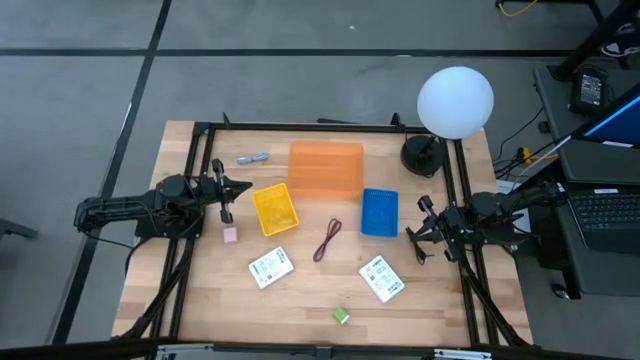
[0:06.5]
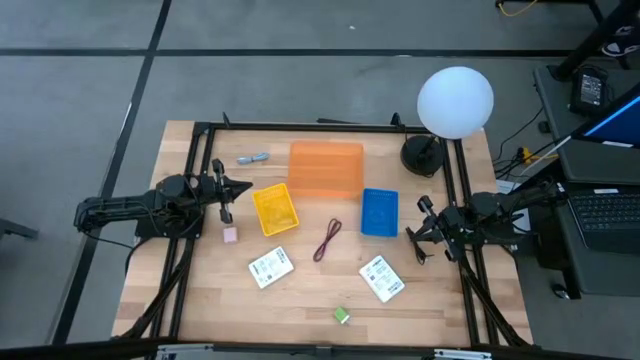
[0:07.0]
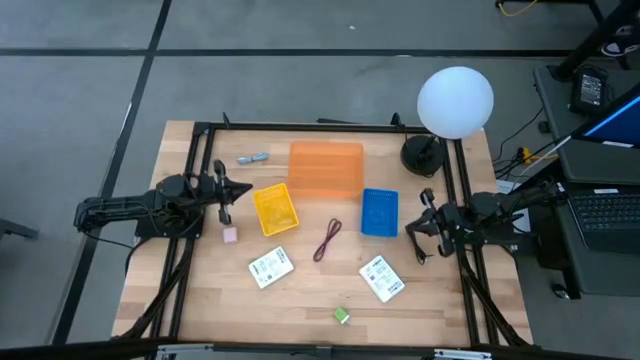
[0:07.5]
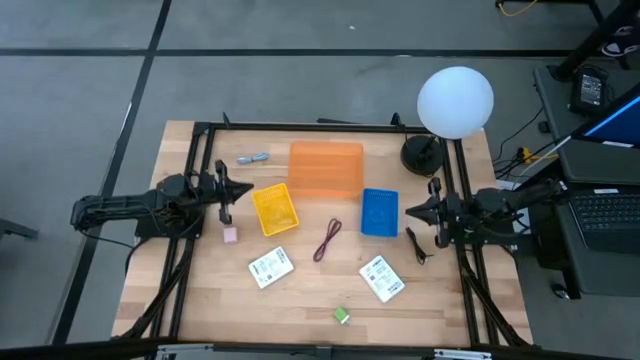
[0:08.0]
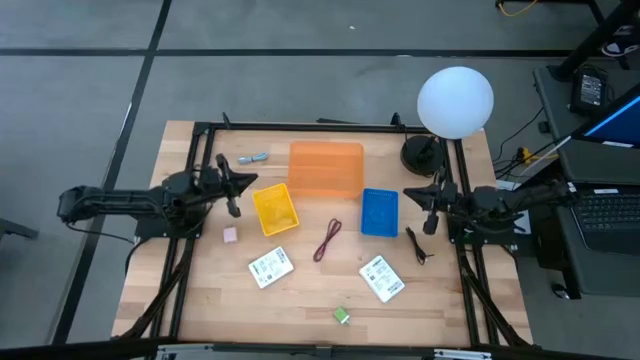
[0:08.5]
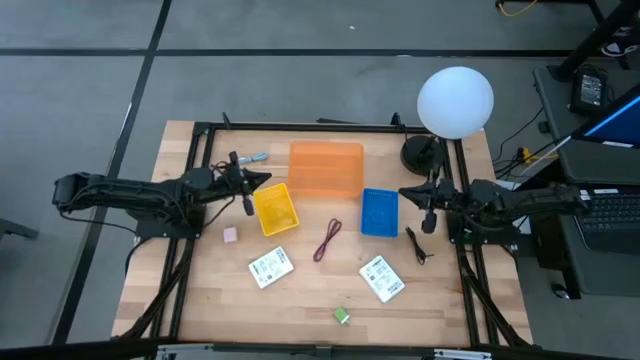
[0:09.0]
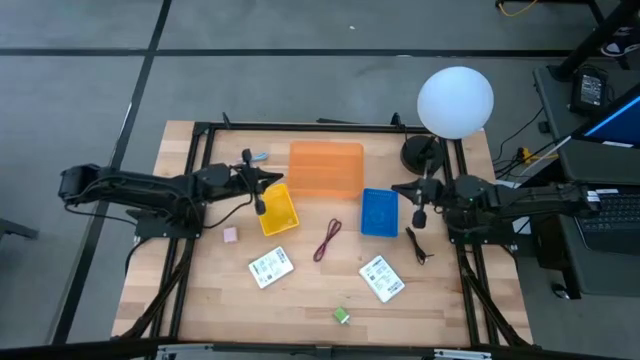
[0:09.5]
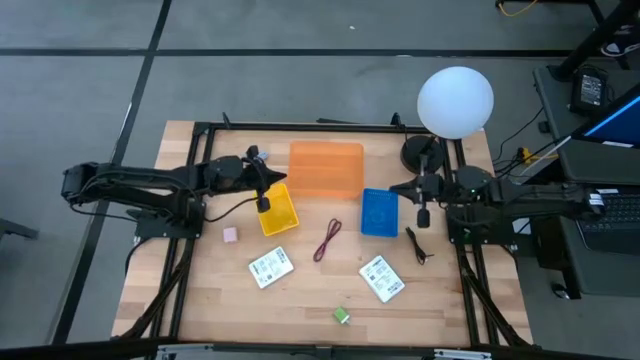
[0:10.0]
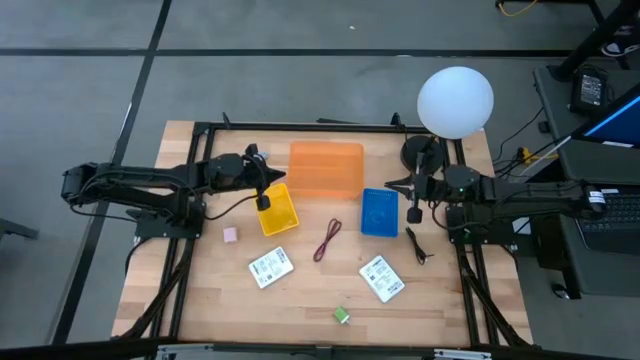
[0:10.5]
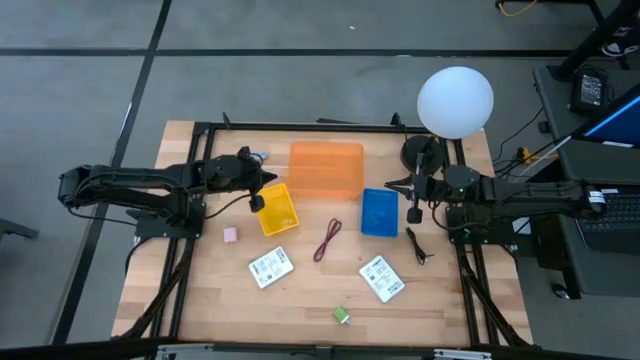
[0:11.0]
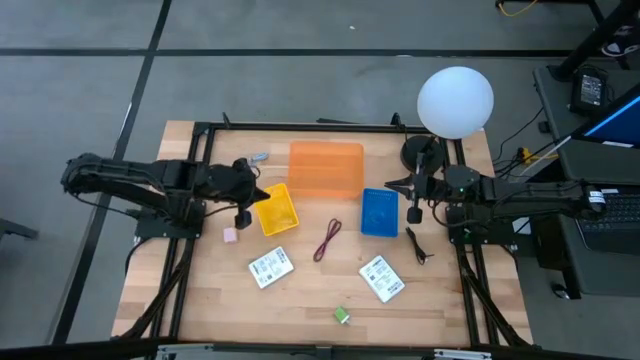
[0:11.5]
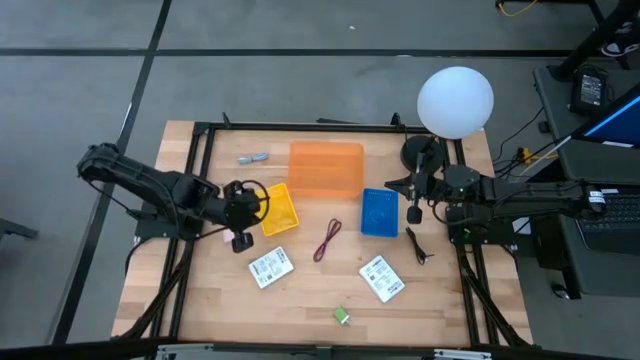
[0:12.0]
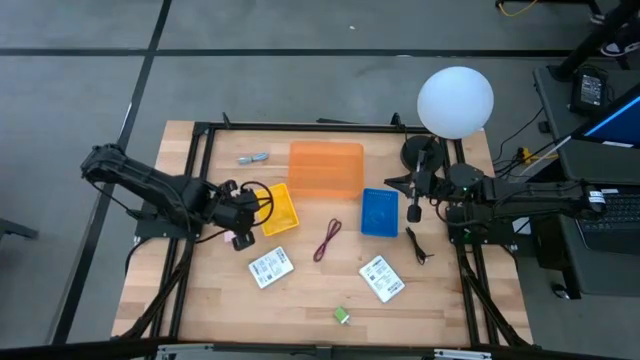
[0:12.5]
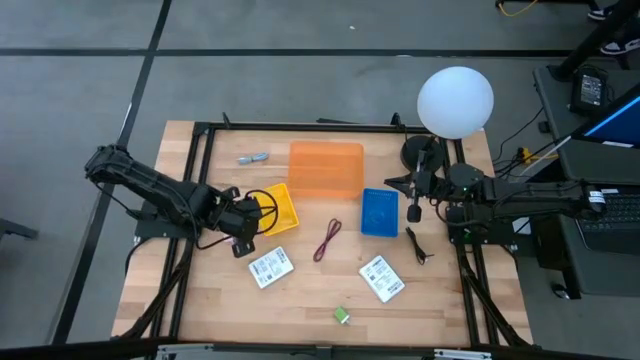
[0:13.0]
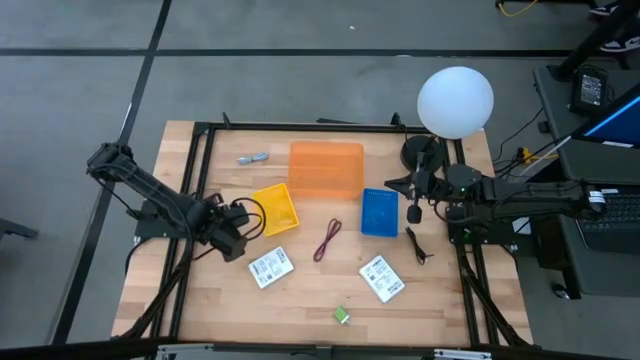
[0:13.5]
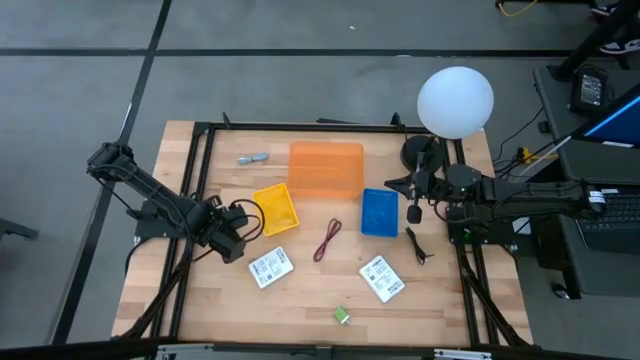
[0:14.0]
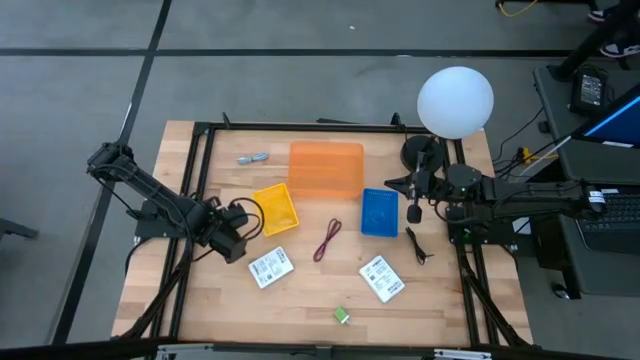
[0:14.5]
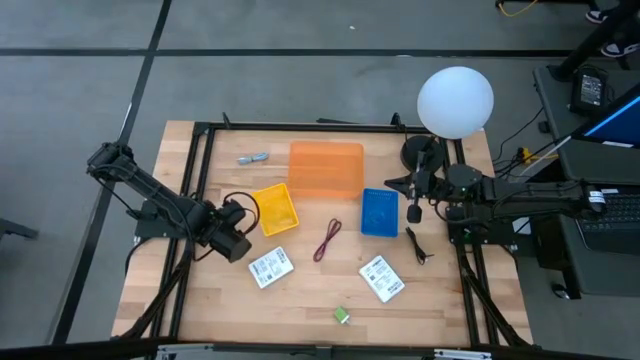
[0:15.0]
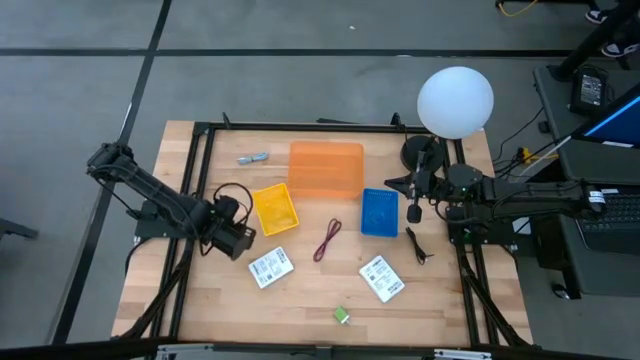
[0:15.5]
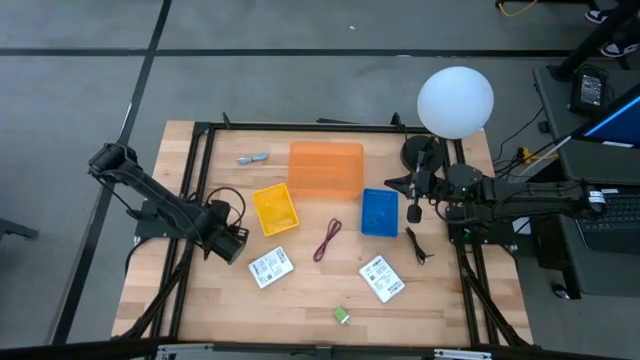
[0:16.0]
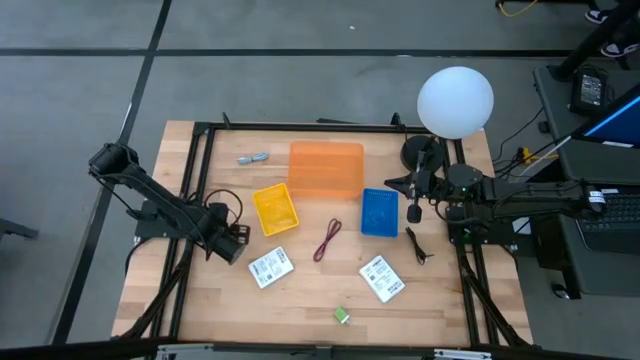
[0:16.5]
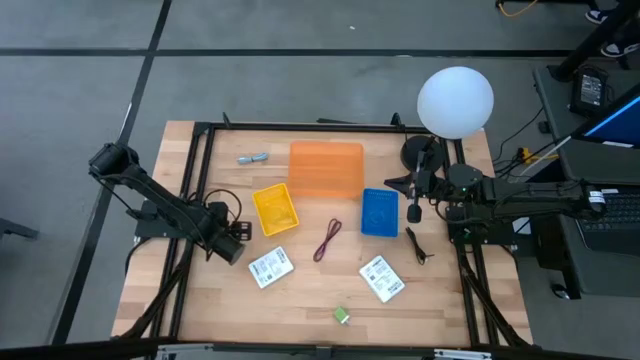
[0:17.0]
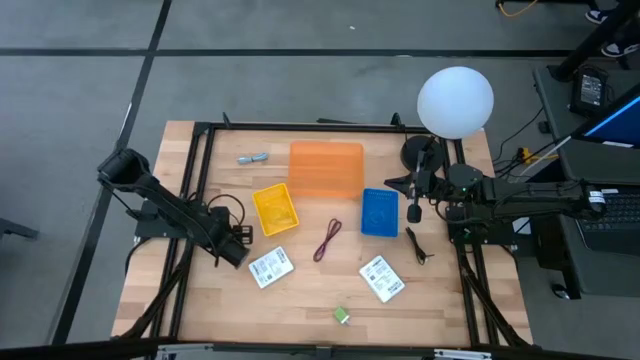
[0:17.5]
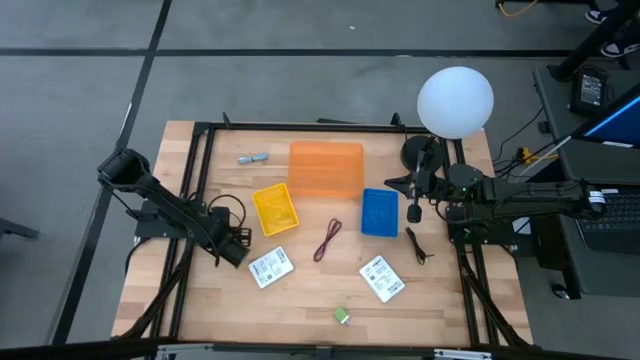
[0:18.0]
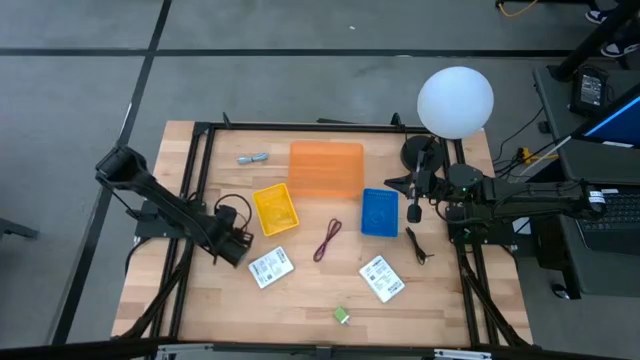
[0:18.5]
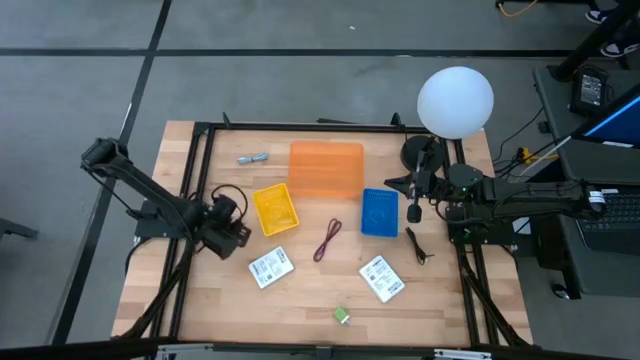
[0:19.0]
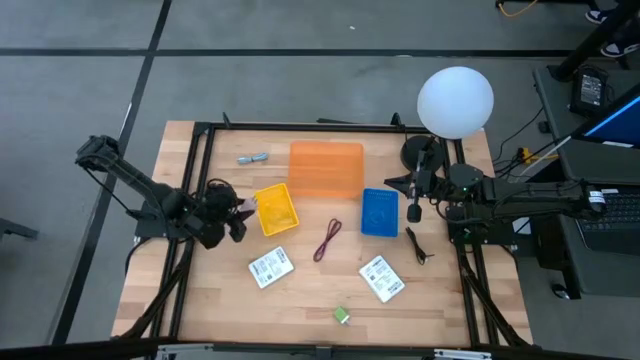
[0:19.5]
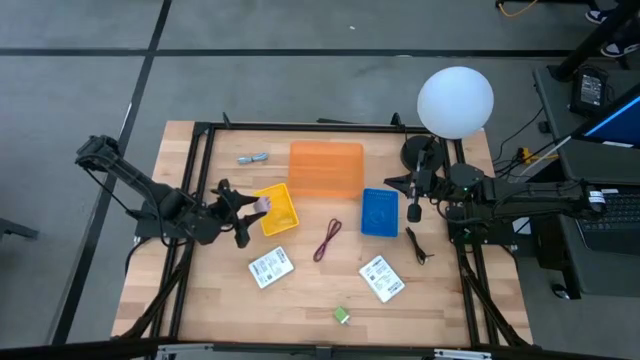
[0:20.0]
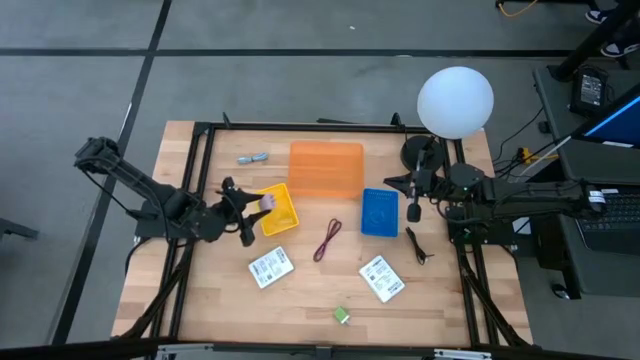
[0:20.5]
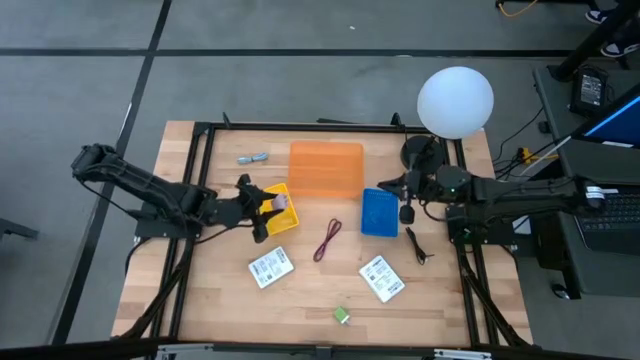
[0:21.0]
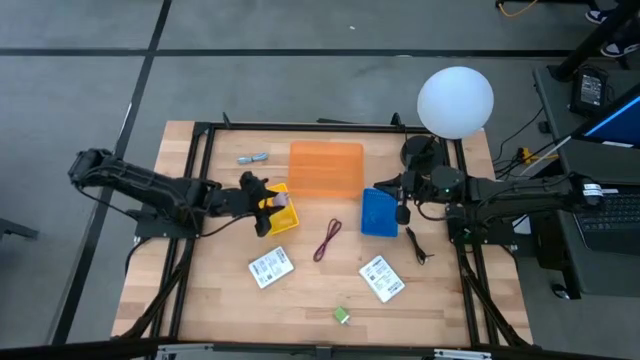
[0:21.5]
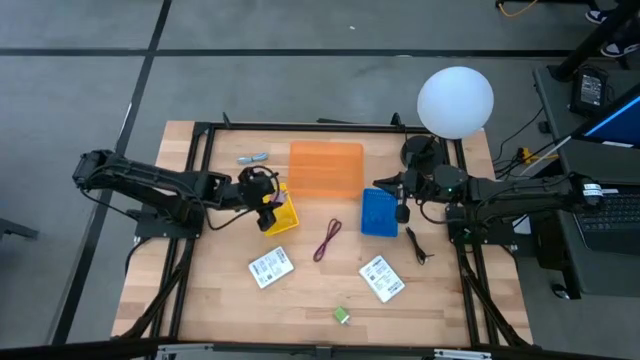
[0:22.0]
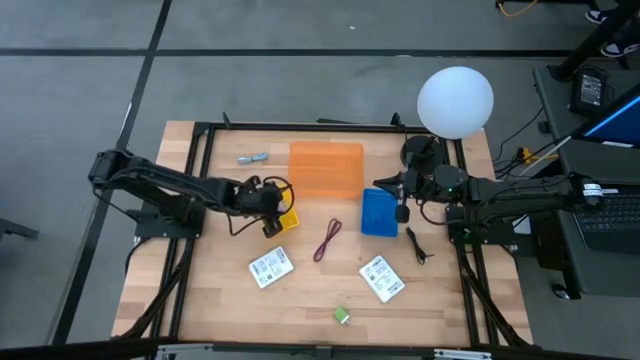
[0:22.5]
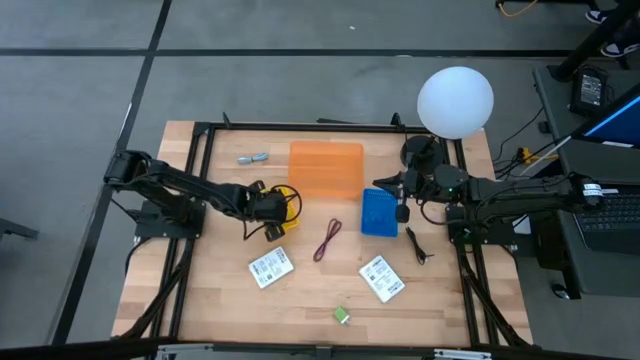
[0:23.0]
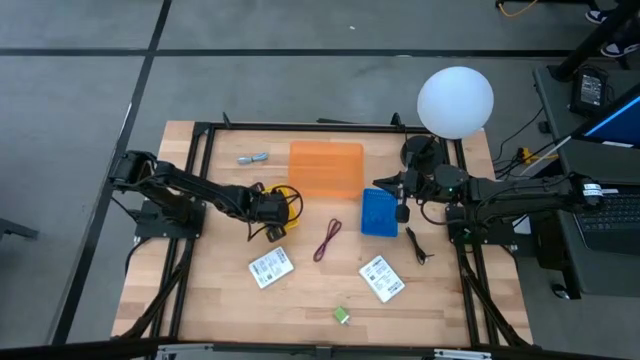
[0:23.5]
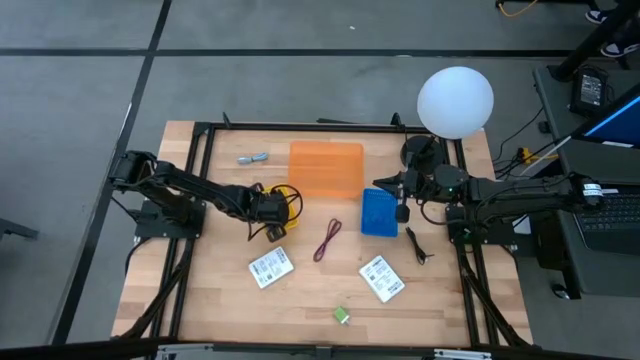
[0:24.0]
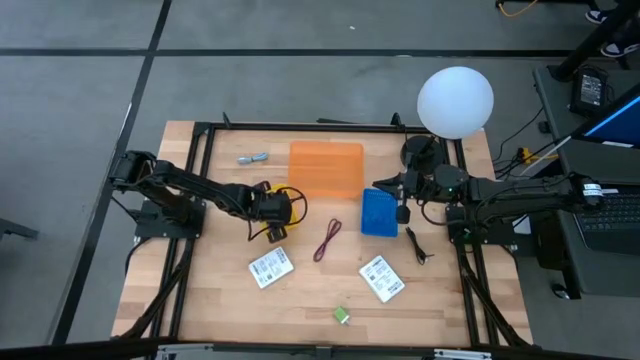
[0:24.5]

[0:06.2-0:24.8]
Task: Pick and place items into bin
Put the white charger adapter into the yellow bin

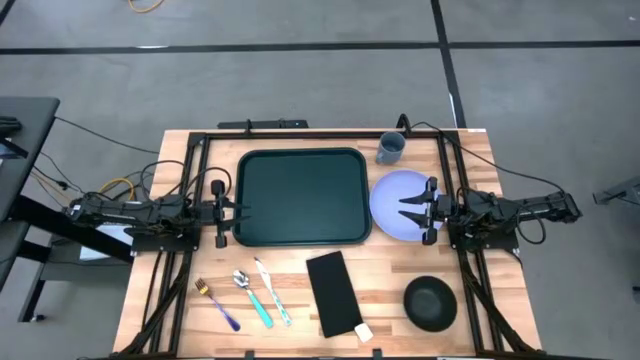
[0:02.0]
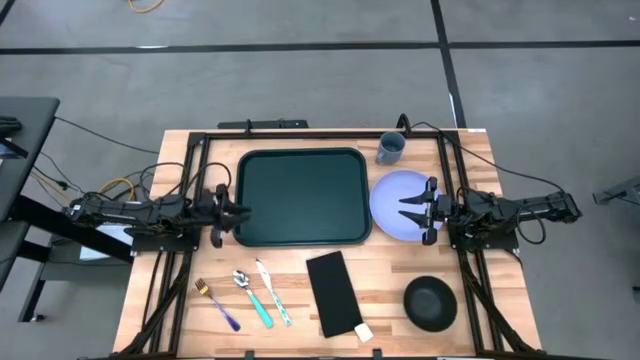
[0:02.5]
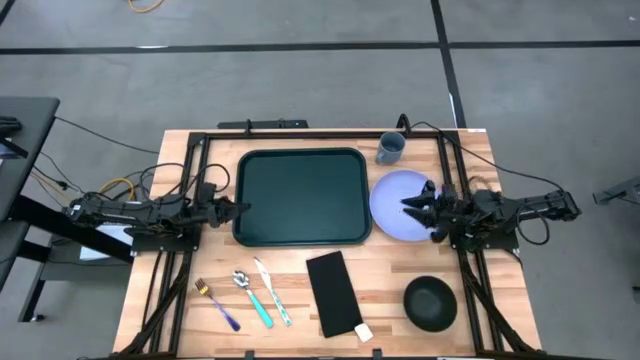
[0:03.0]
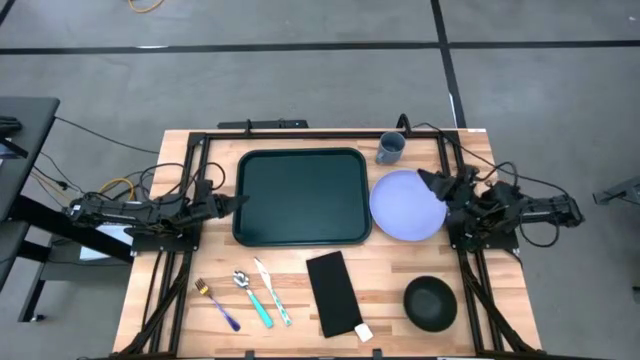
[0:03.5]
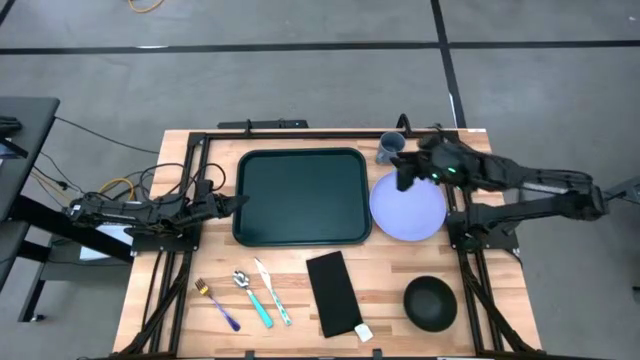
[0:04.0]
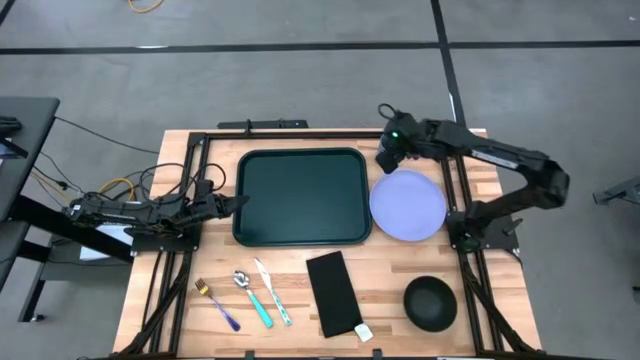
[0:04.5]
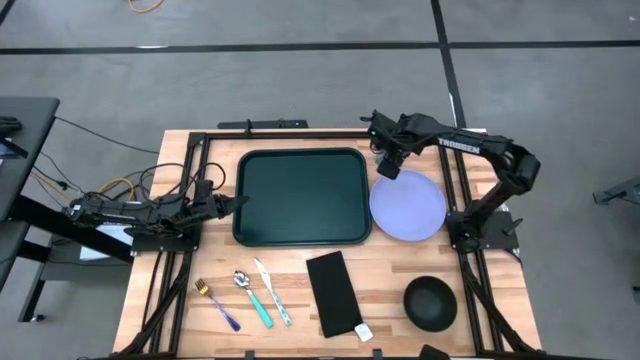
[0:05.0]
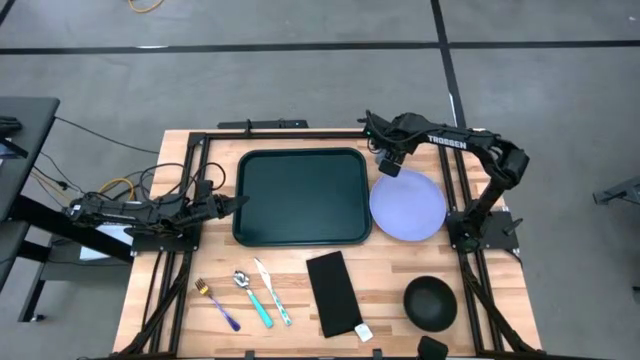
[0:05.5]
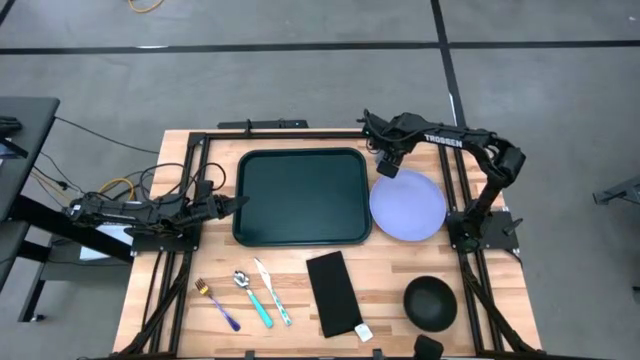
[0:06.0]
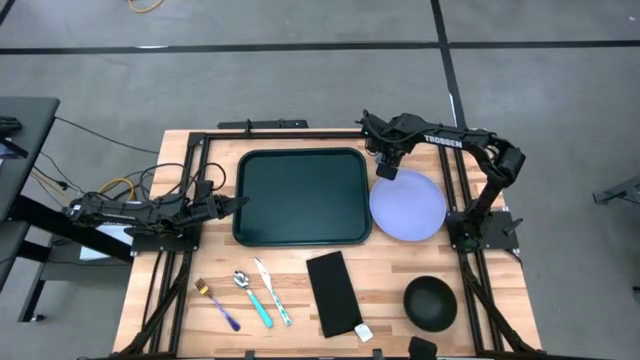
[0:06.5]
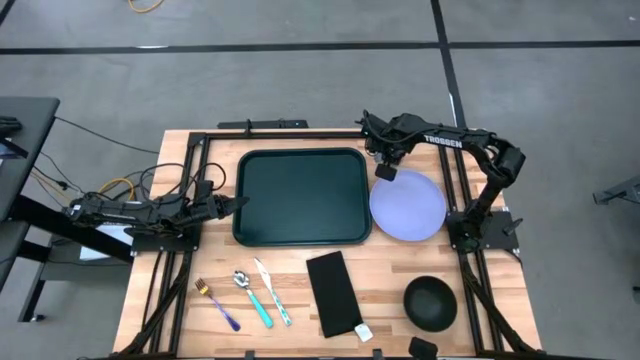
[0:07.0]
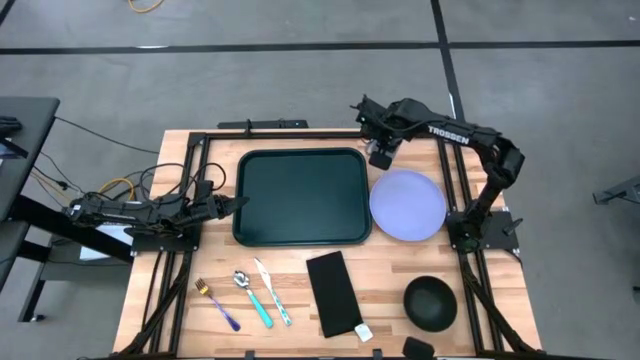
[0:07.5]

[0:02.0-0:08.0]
Task: Set up tray
Put the gray mug on the black tray
